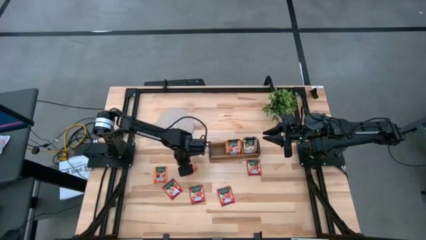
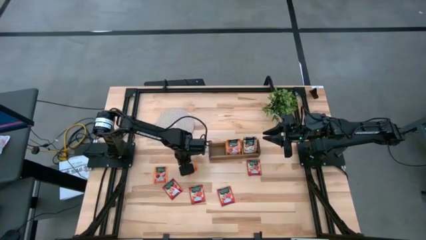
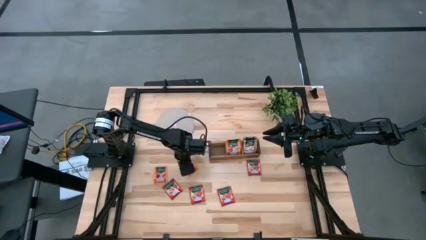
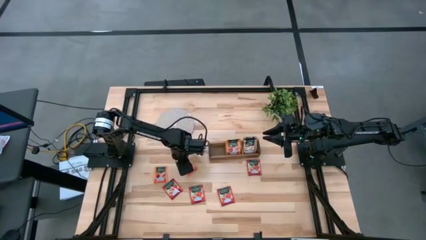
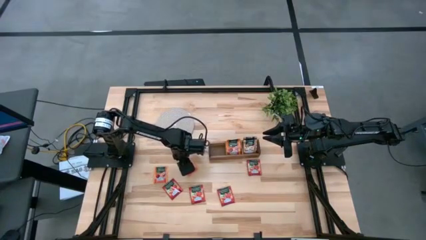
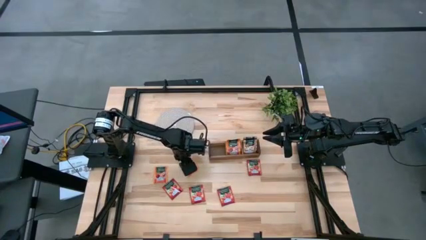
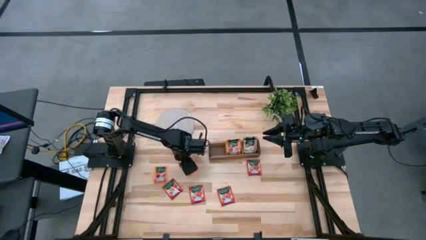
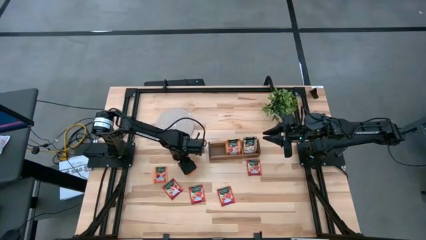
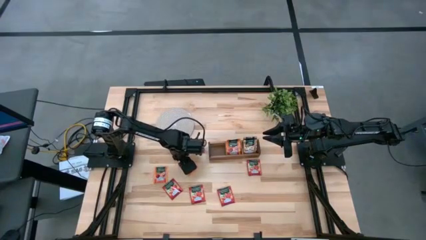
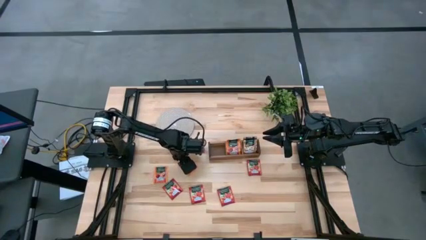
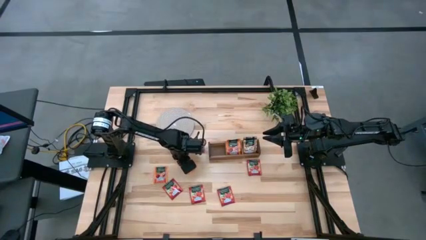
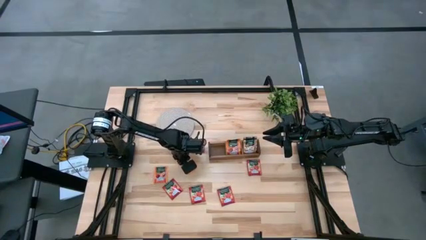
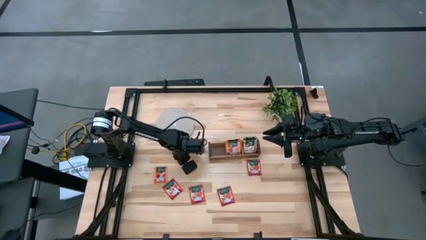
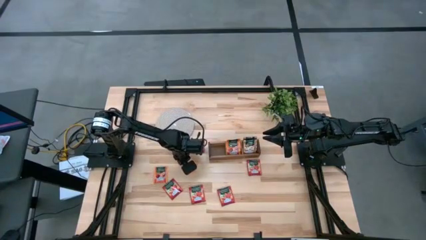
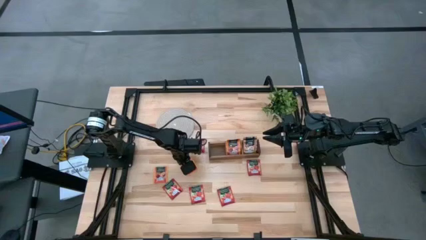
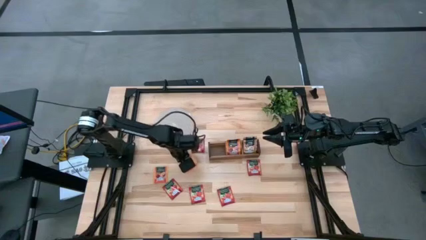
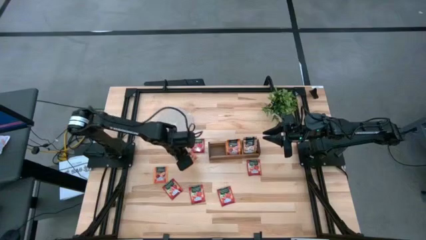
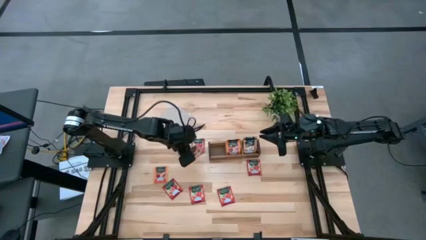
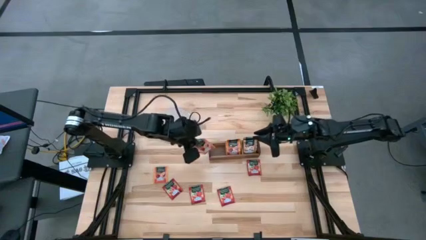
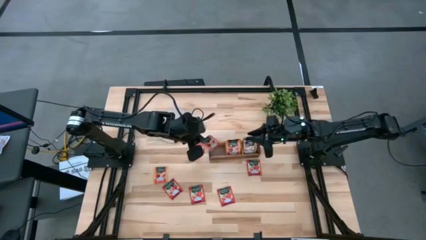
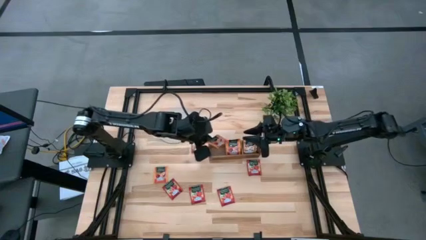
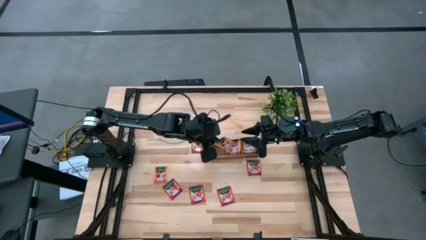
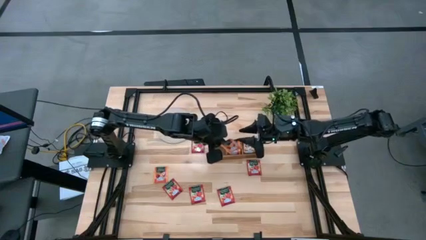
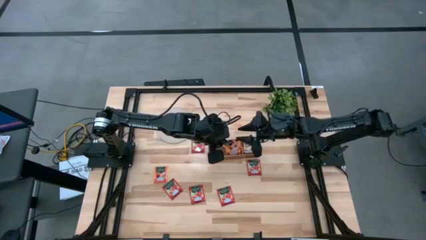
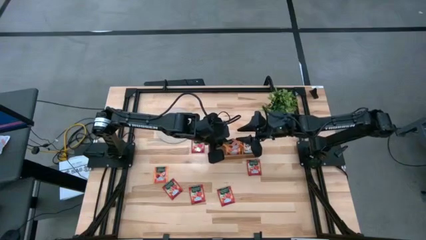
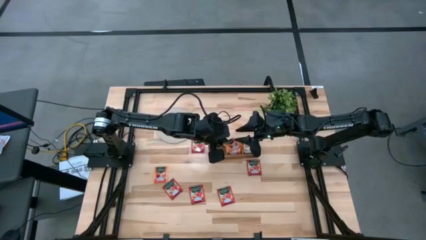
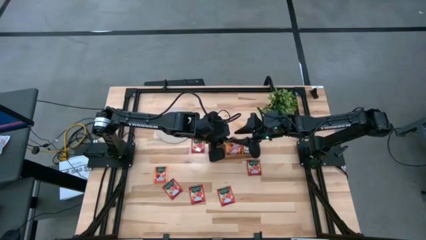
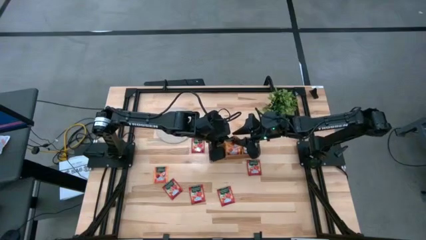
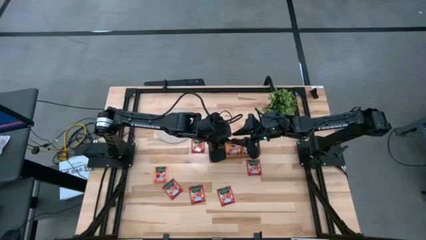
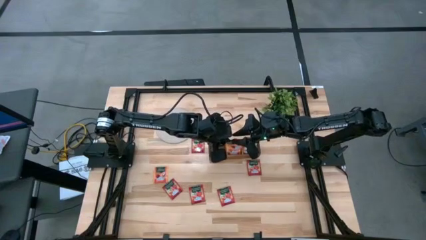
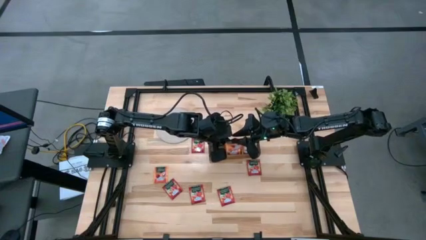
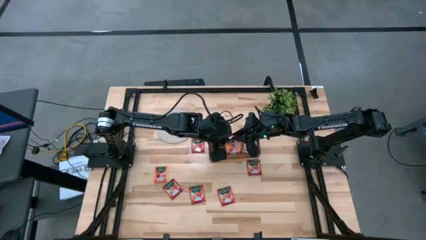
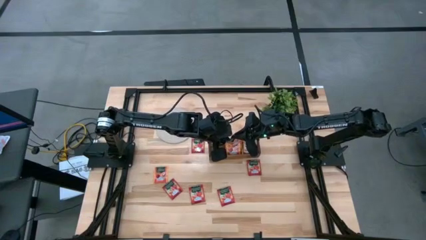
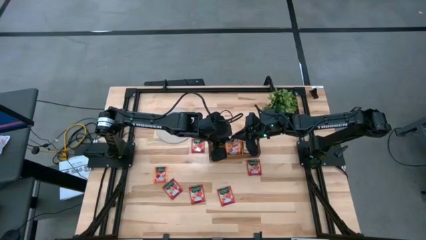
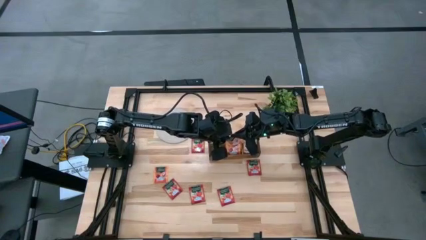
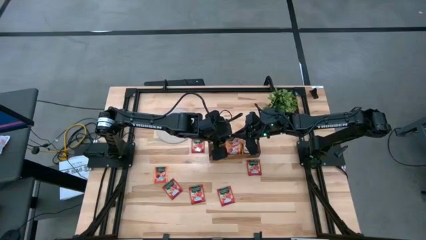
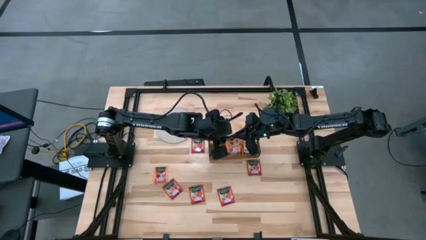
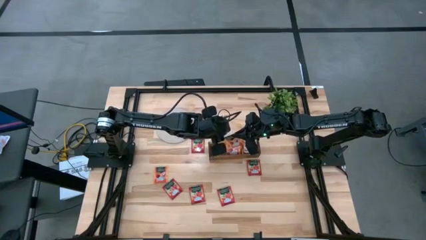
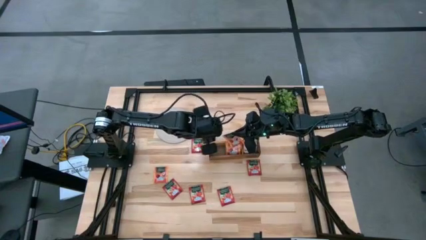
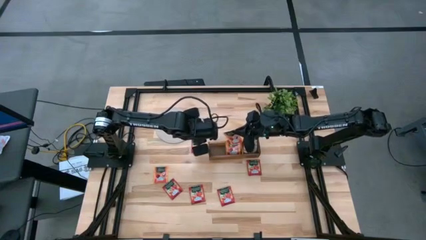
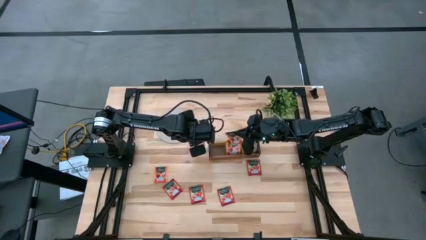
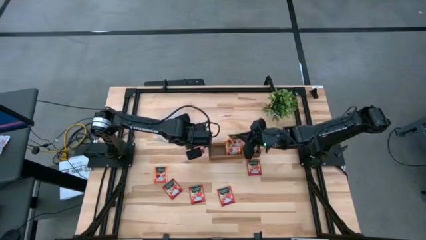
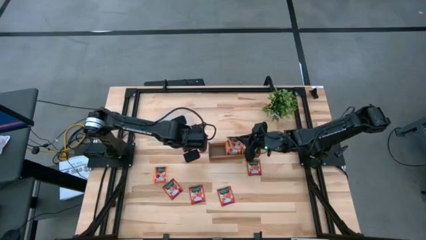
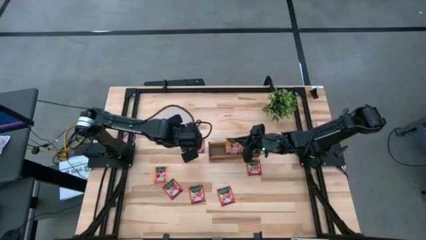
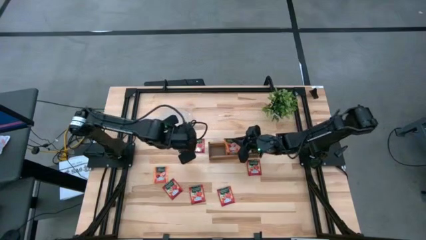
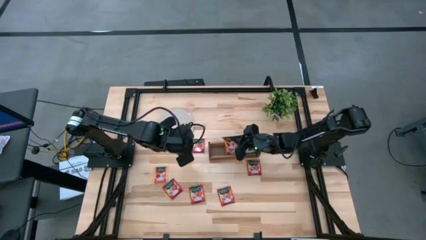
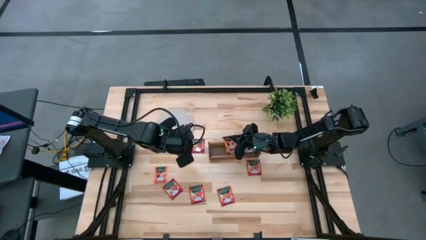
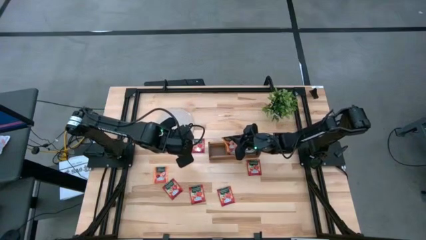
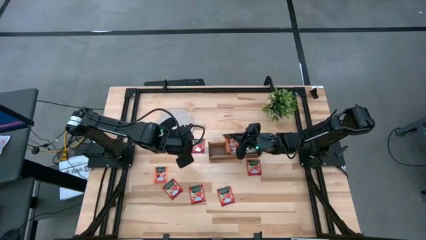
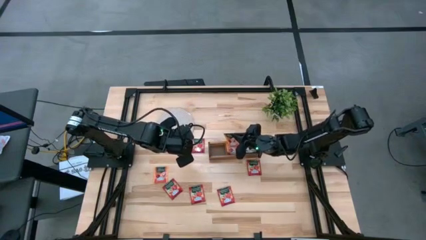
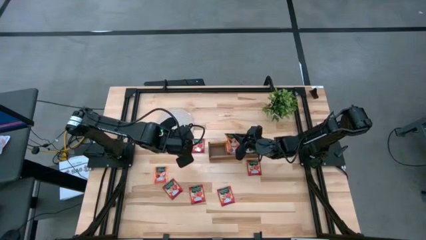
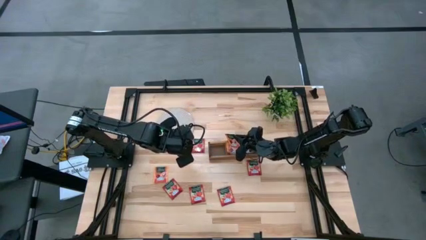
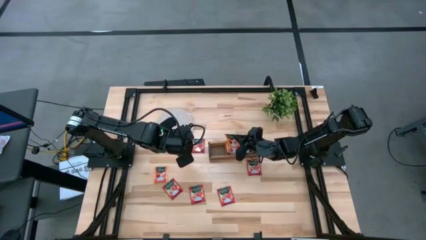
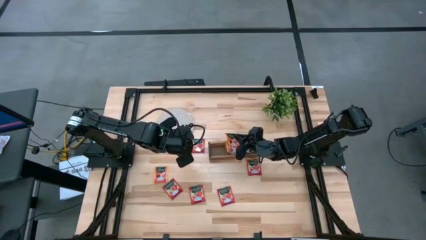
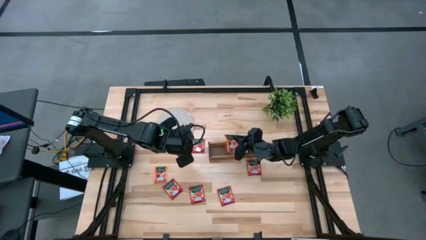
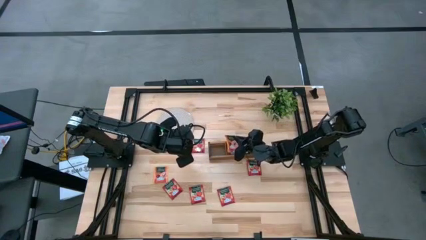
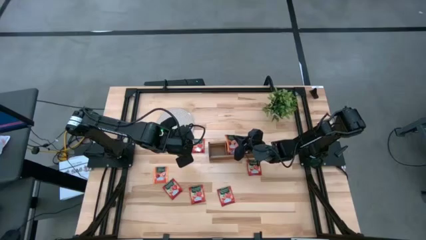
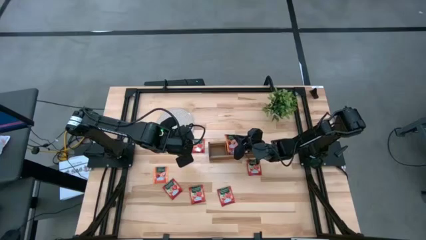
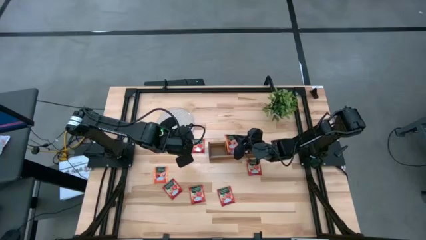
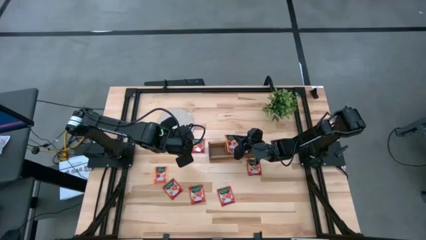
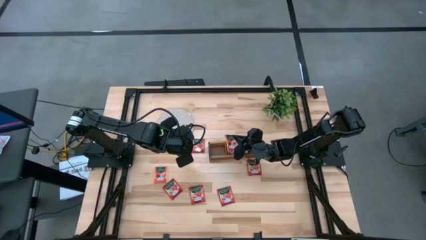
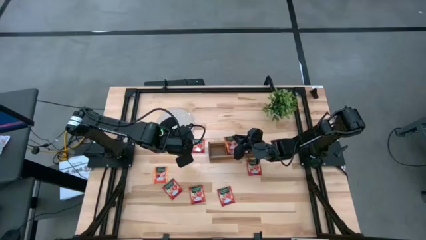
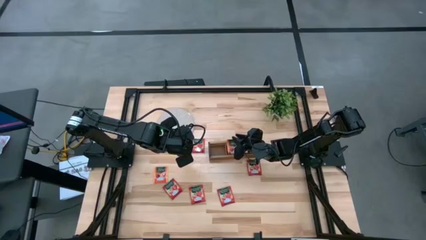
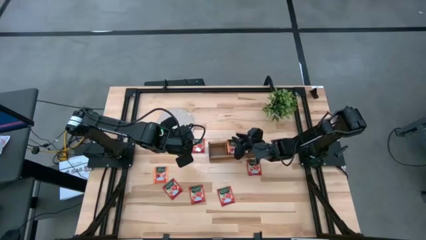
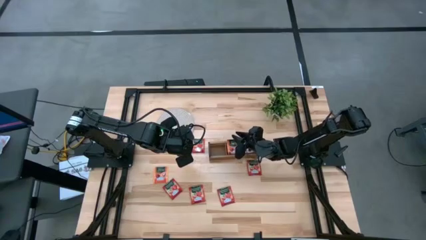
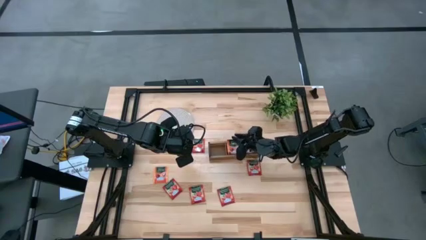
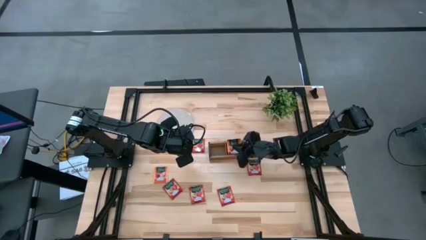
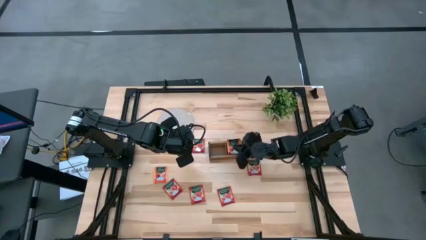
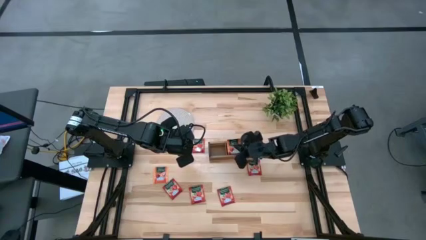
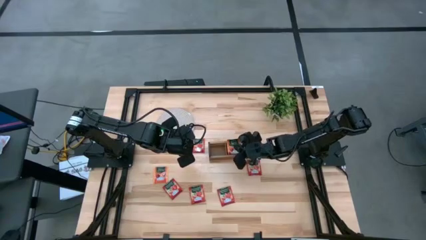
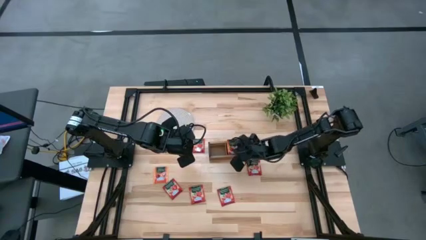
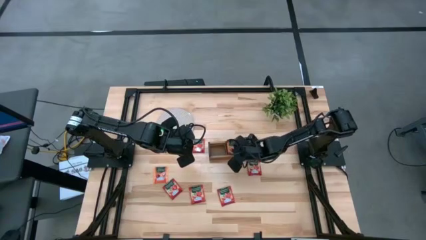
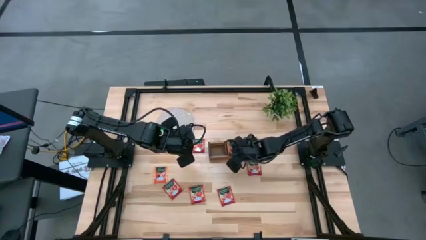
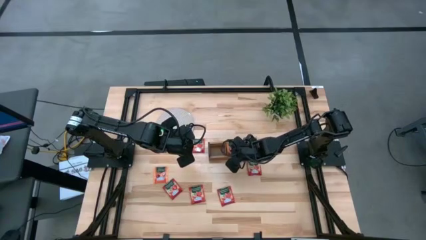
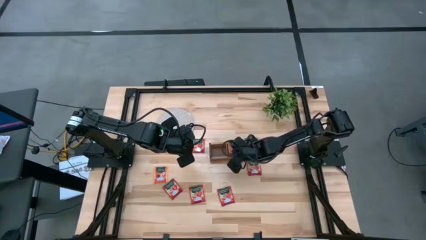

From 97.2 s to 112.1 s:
Task: Pick & Place Tea
Put the orange tea bag into the middle section of the wooden organizer

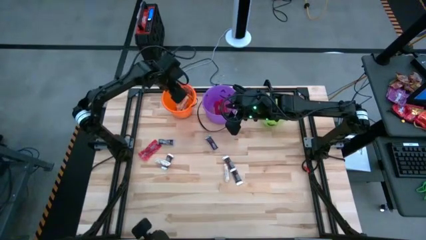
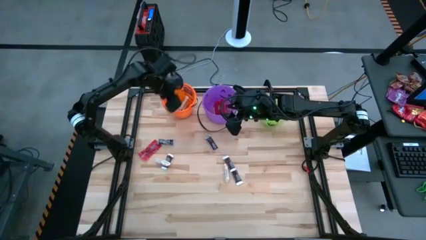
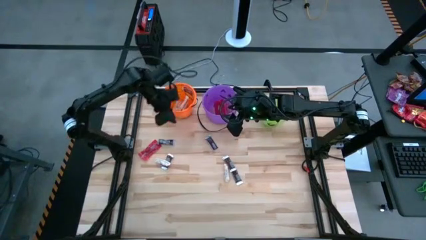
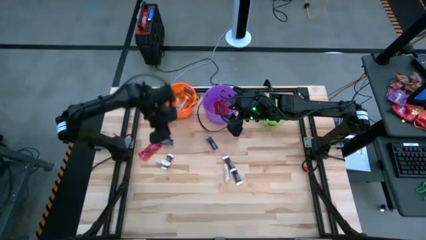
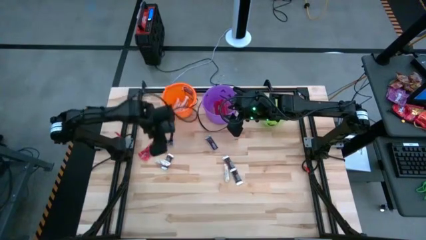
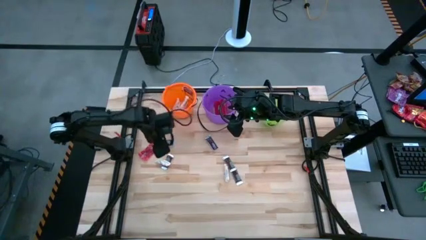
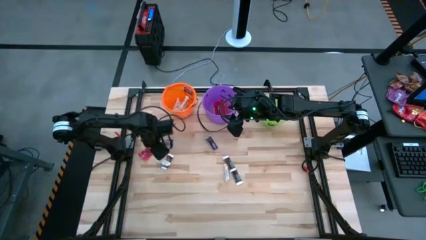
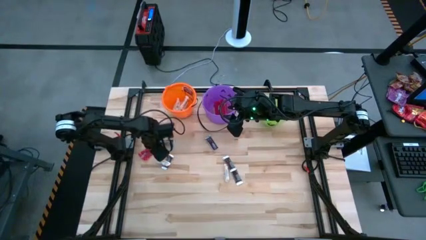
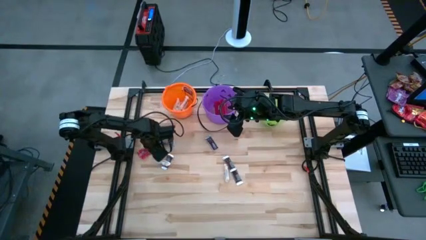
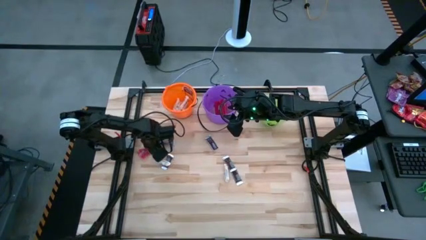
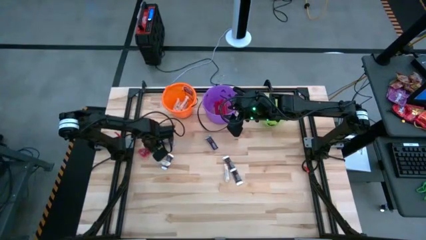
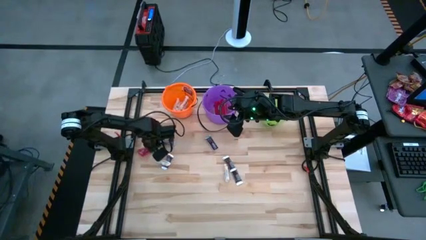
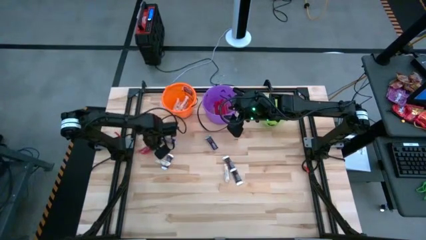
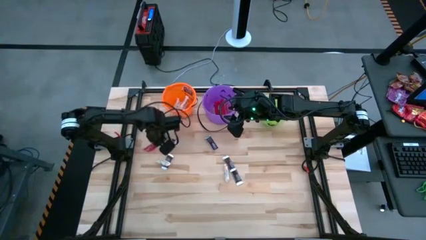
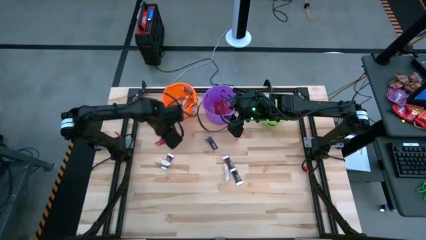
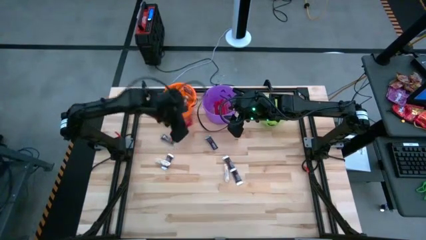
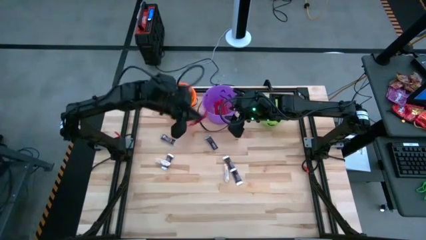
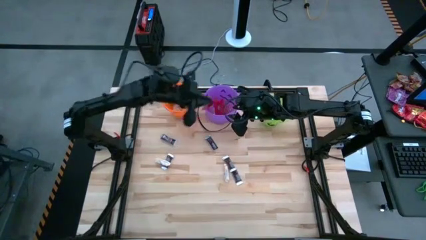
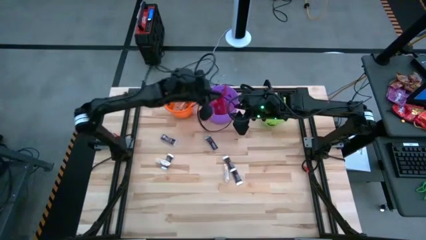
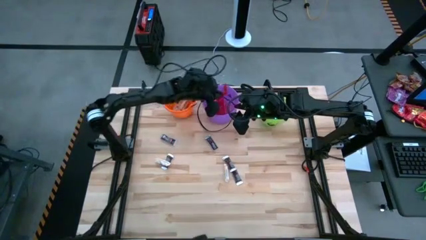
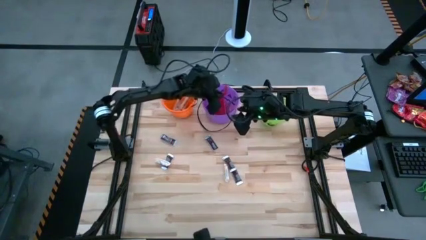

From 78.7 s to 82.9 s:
Task: Sort candy by brand, put in halloween buckets
Put the red candy pack into the purple bucket
